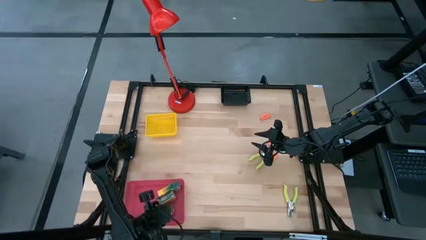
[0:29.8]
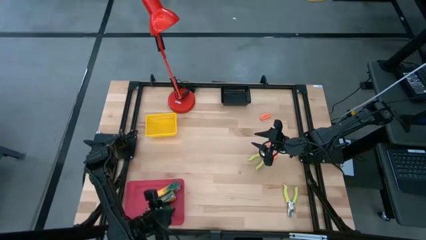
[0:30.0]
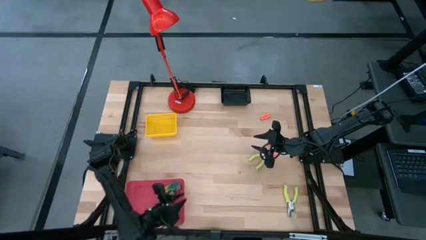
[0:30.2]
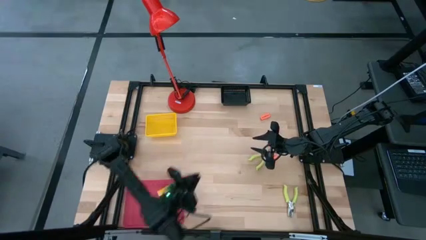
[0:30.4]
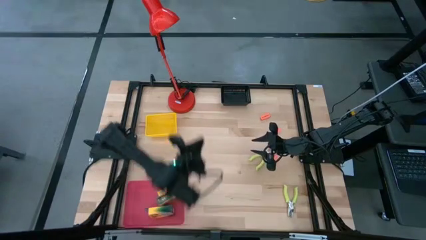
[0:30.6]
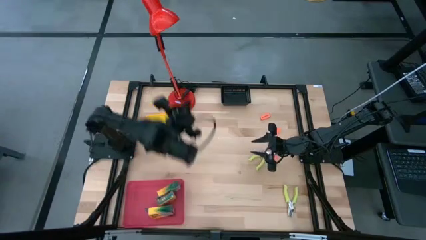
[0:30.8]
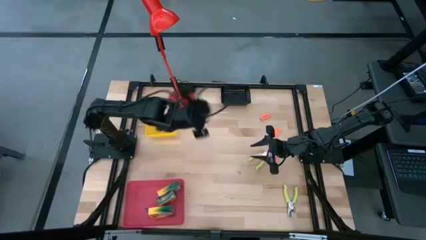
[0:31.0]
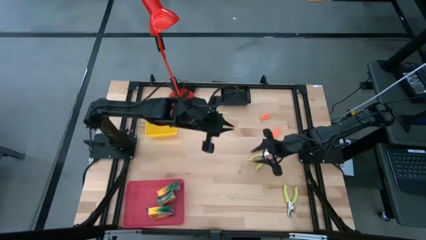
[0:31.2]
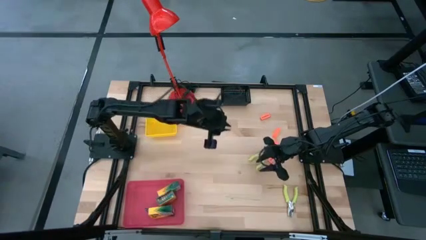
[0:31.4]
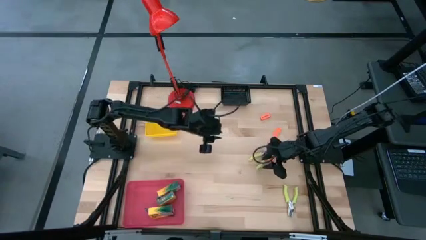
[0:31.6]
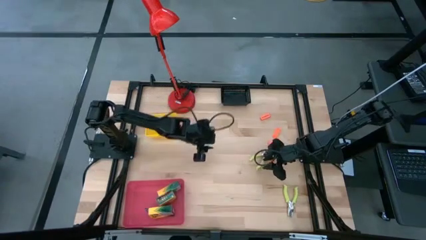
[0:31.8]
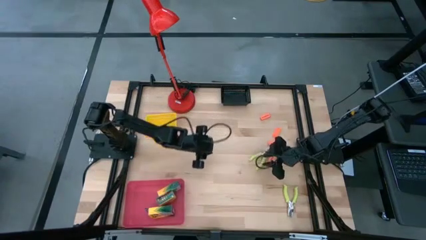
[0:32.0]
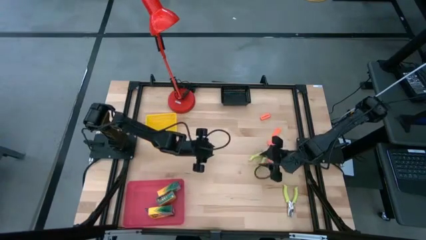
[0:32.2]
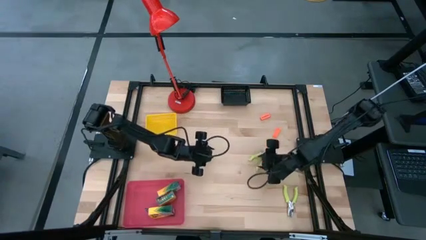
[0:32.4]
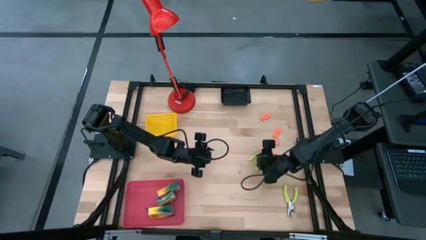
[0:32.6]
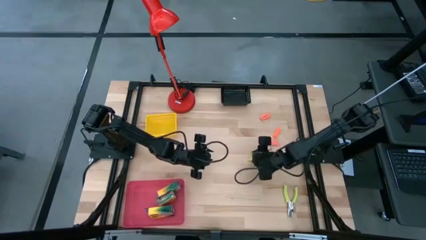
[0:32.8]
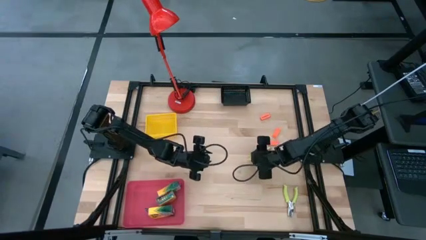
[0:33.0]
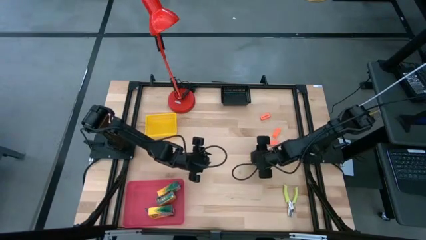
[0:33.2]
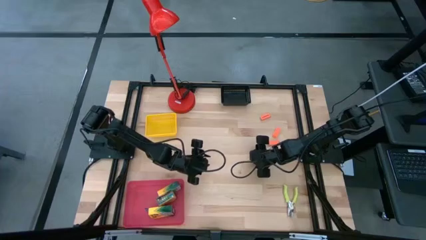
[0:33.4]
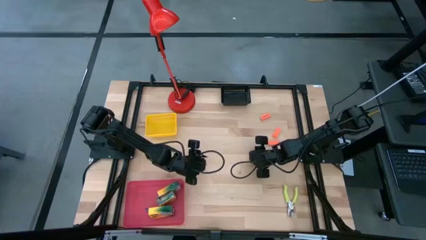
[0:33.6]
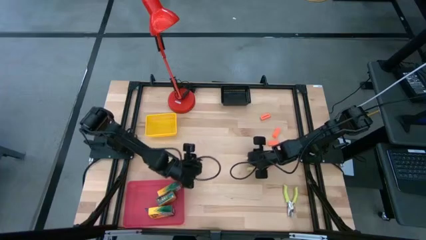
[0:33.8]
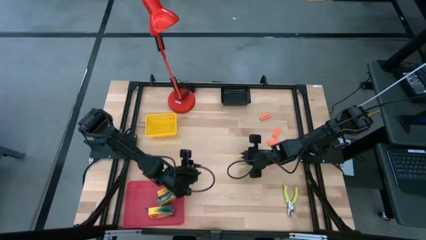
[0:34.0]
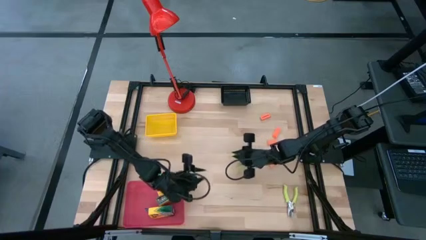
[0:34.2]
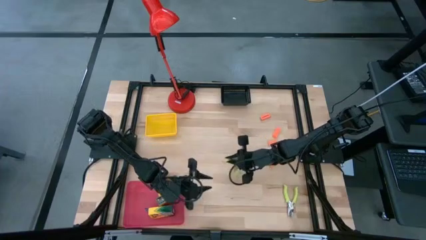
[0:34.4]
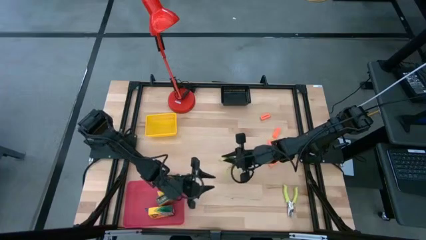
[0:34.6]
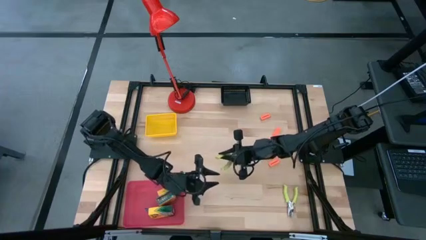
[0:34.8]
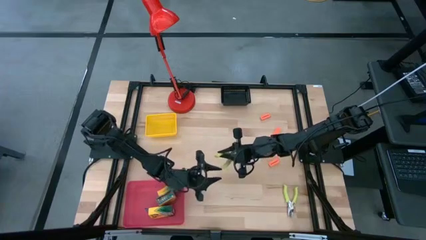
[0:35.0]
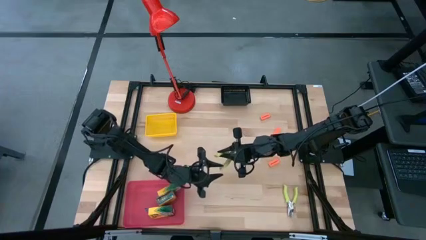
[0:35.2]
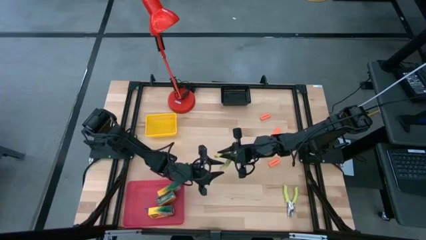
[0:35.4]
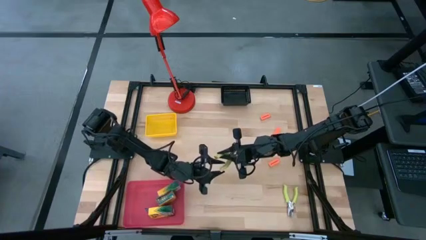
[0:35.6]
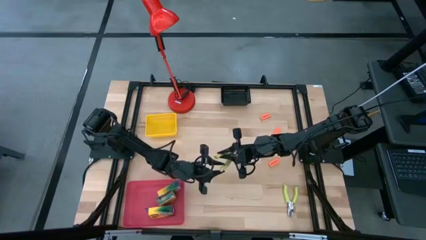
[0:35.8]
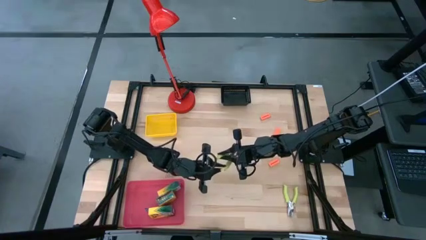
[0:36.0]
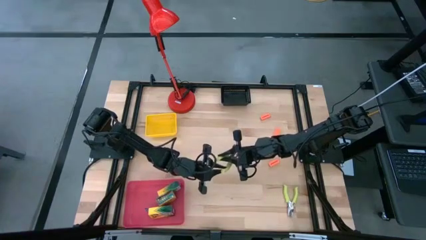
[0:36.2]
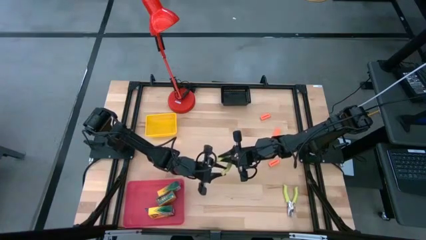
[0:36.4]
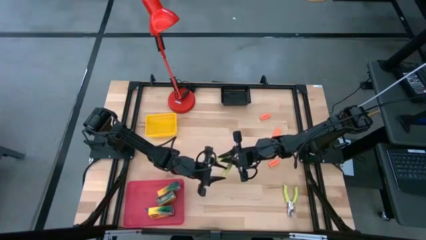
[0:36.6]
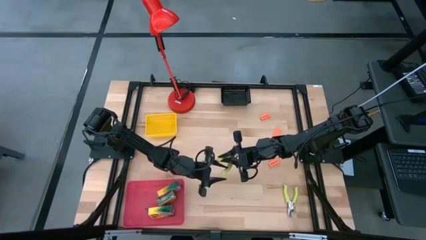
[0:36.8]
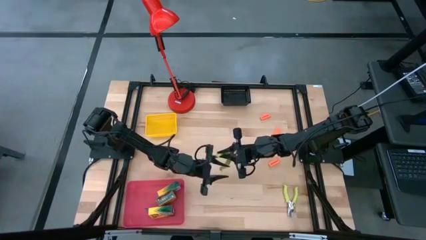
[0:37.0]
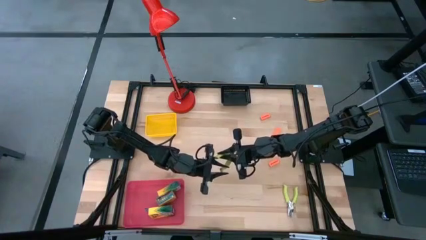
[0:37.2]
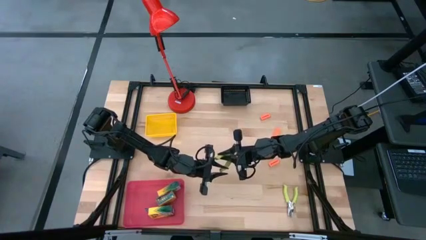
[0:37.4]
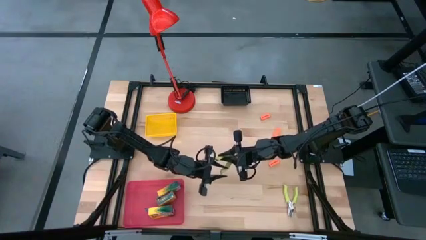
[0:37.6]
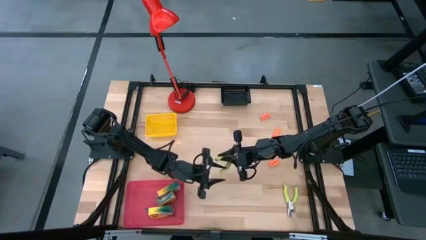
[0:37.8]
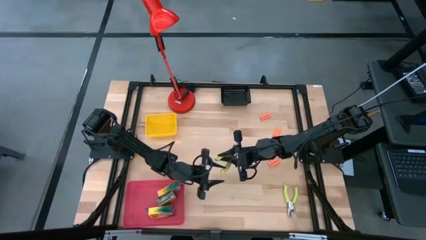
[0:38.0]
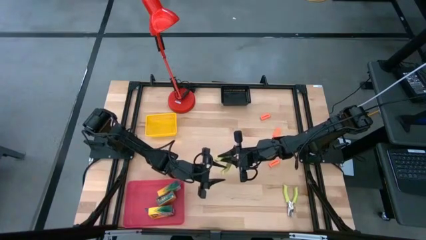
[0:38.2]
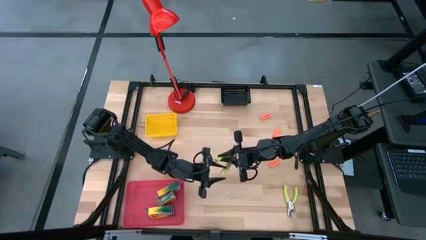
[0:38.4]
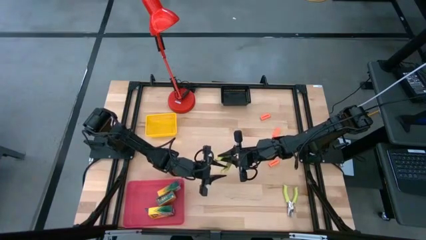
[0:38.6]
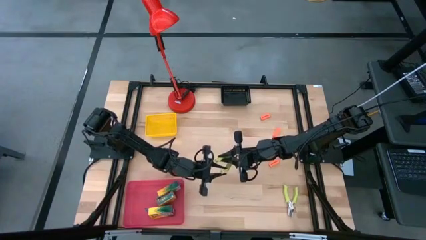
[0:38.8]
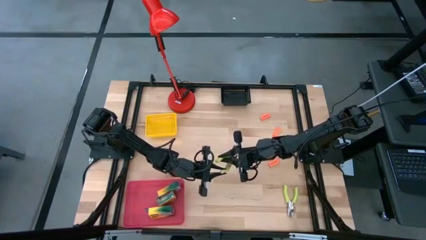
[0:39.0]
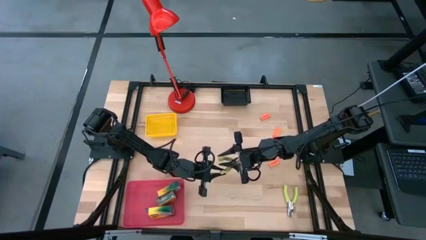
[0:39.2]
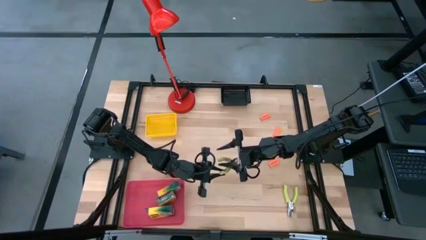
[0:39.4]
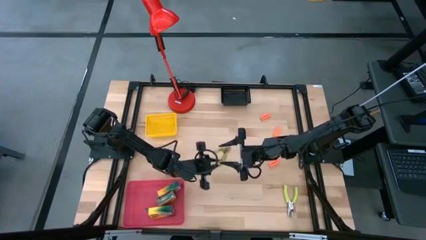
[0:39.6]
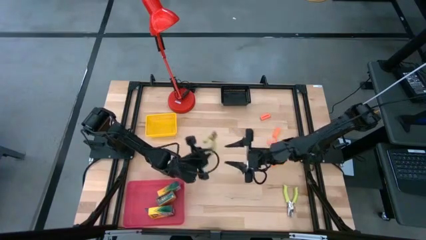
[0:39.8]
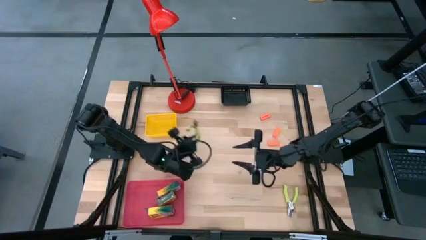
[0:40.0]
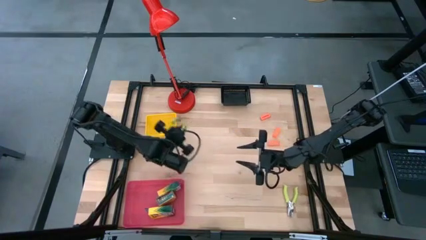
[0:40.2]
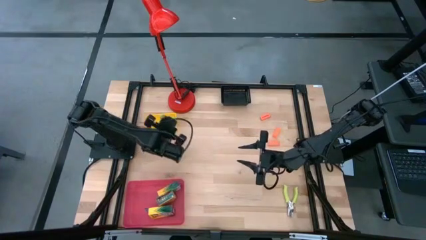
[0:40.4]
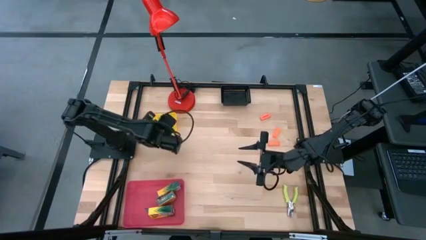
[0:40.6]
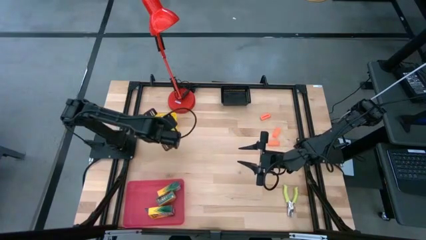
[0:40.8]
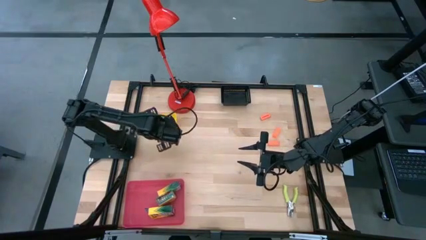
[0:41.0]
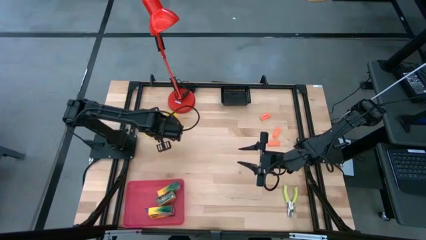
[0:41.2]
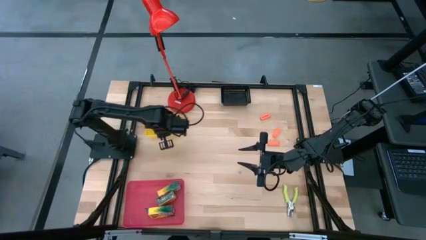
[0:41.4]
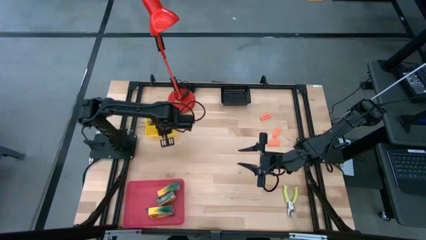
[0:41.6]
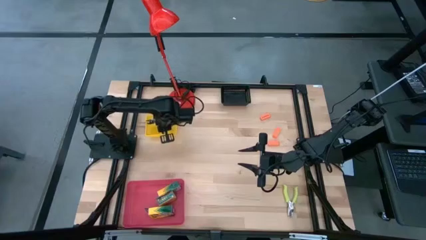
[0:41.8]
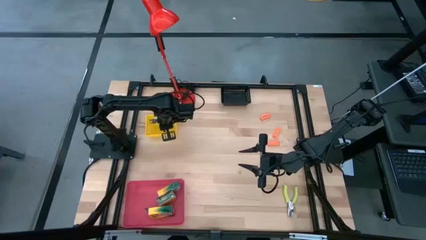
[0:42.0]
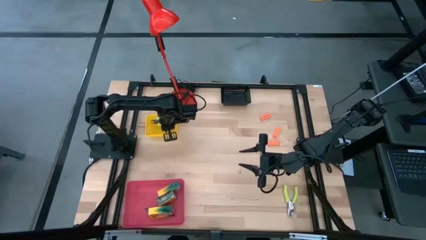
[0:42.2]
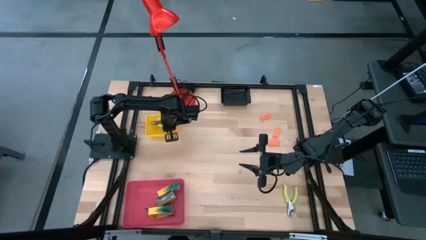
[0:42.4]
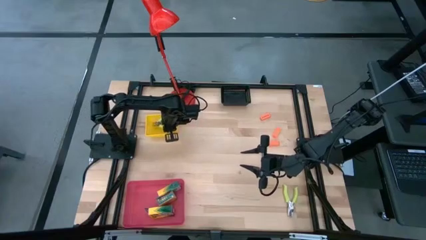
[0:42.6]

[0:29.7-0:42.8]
Task: Pick & Place School Supplies
Put the top hole puncher into the yellow bin

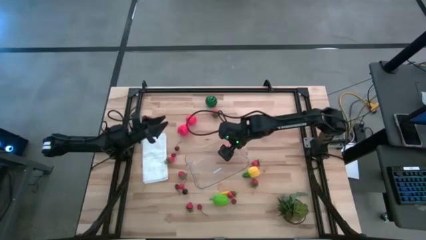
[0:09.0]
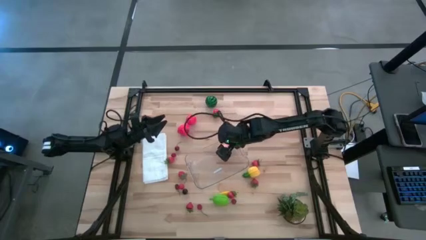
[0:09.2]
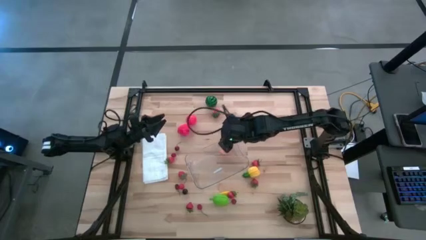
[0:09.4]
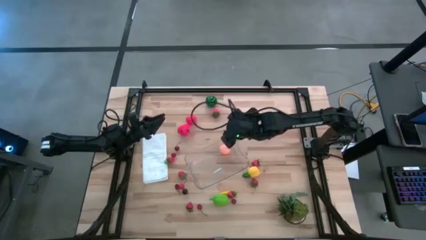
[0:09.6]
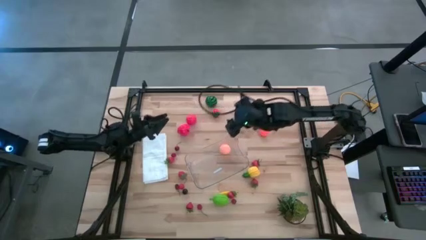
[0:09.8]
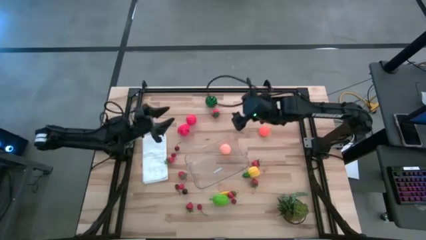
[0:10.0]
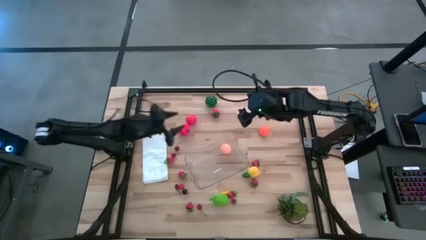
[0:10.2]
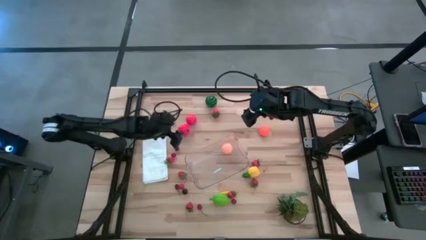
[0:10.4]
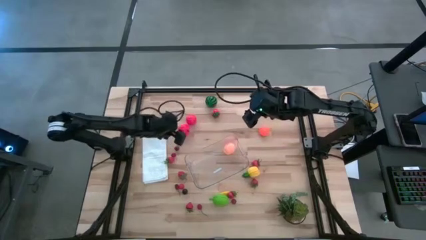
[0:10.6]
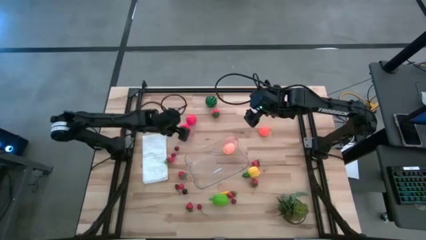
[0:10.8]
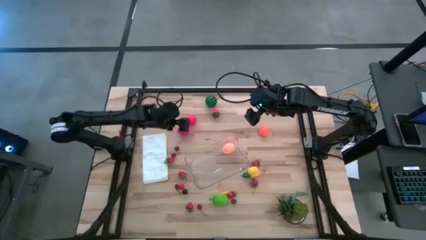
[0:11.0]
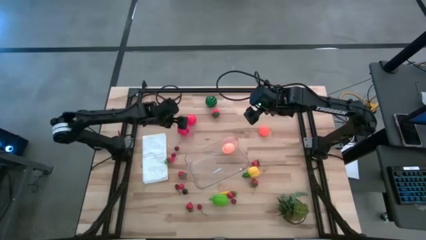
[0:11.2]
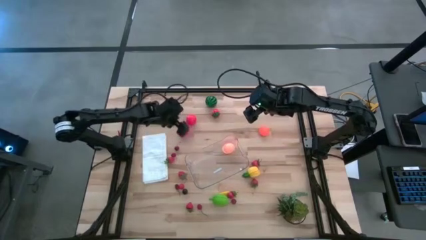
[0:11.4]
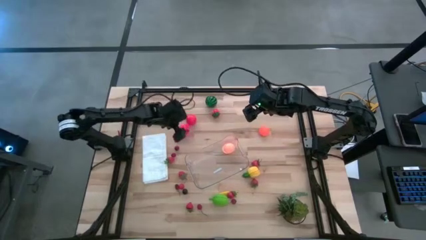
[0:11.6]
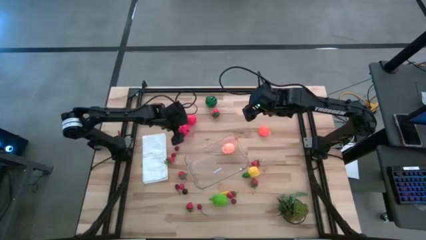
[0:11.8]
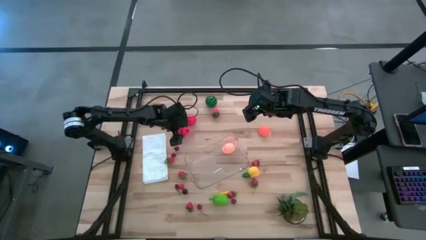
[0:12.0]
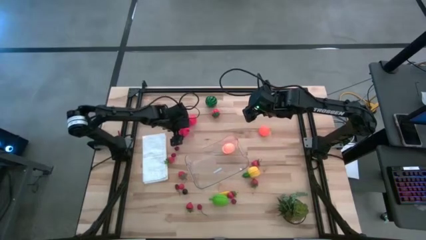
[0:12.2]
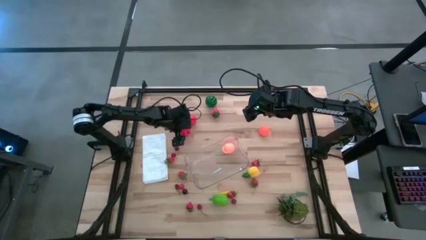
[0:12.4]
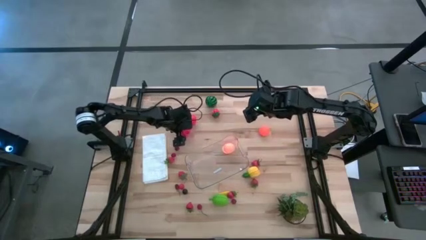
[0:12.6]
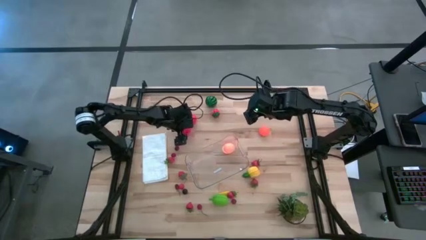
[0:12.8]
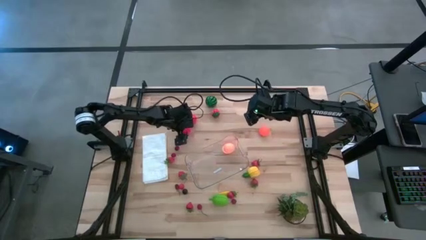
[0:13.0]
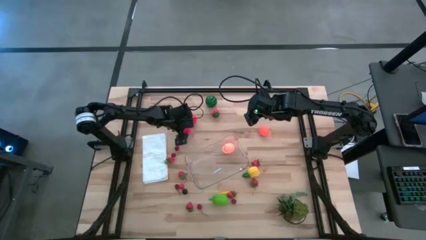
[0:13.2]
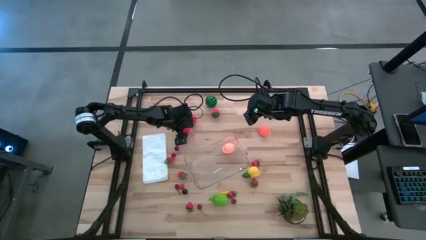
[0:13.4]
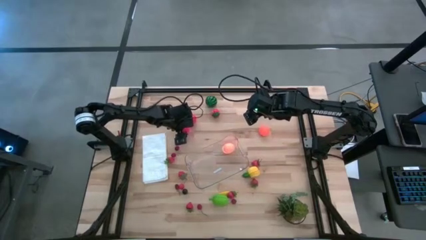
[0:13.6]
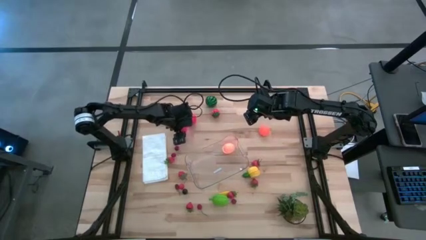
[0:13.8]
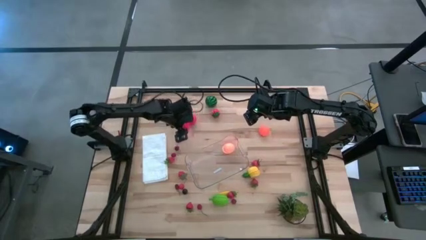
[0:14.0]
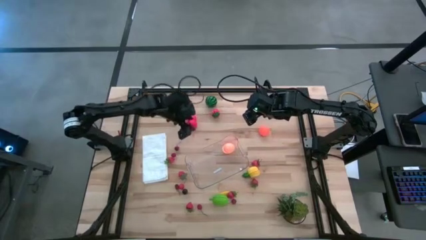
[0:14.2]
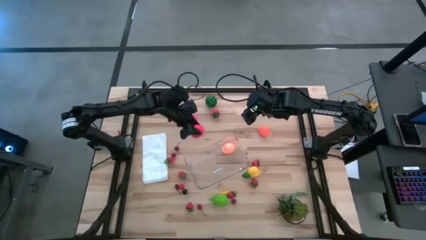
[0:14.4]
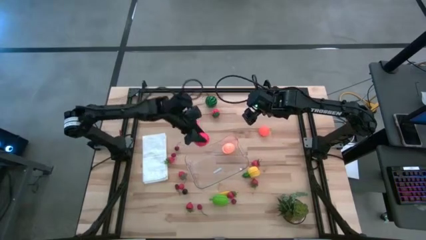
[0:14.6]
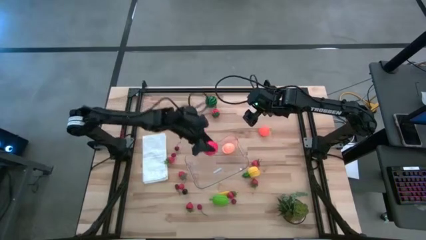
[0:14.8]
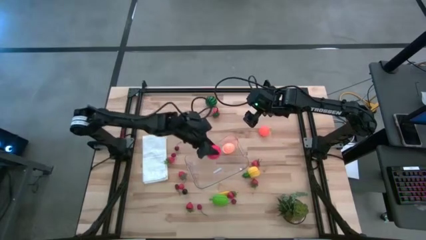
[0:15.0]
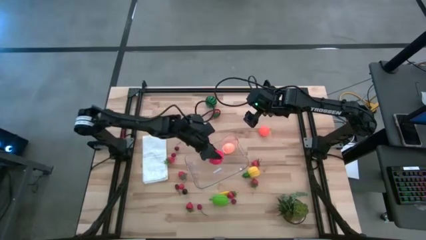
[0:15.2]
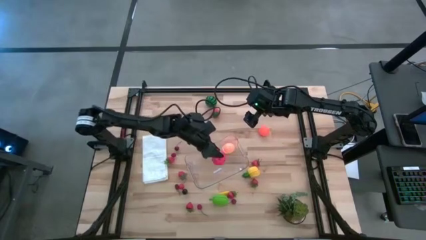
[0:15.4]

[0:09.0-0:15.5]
Task: Pick and placing Produce into tupperware
Put the bottom apple into the transparent bin
